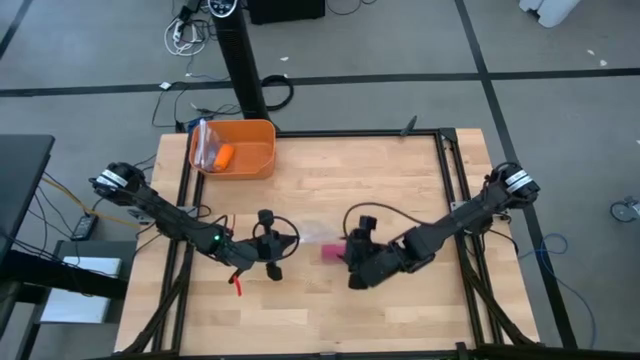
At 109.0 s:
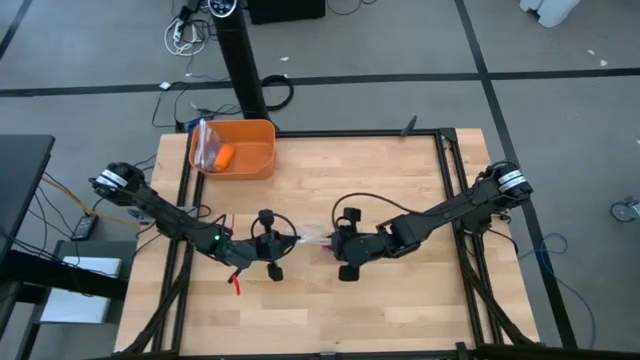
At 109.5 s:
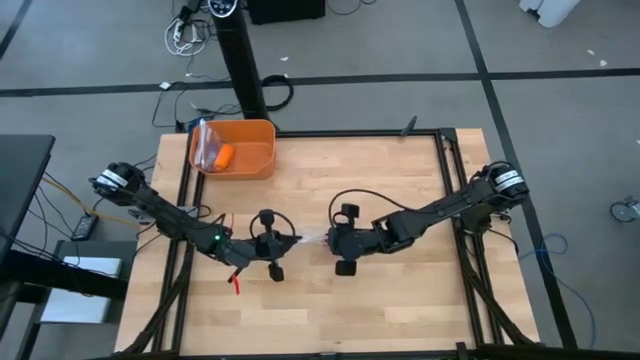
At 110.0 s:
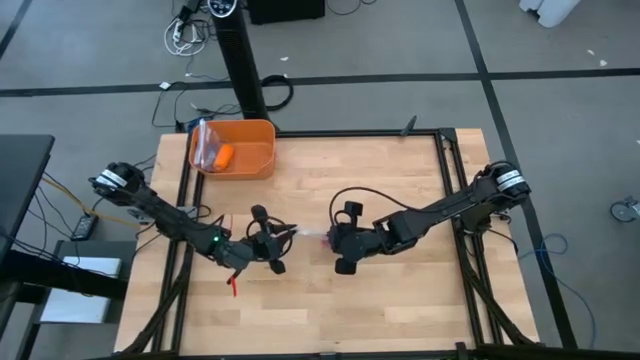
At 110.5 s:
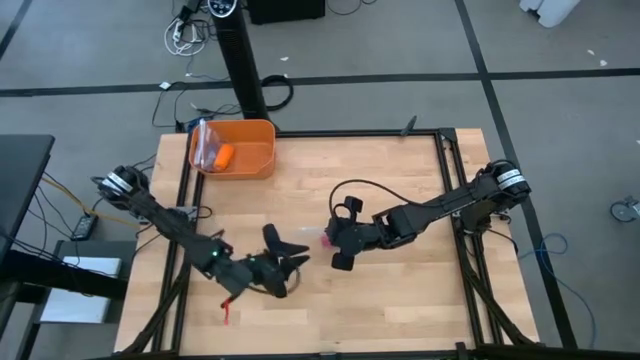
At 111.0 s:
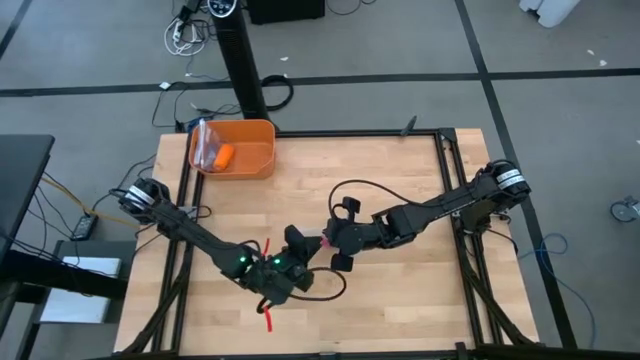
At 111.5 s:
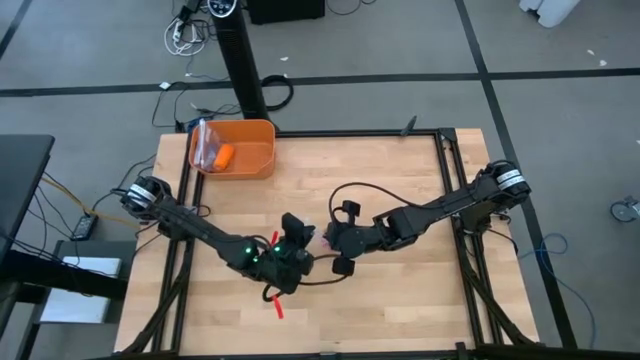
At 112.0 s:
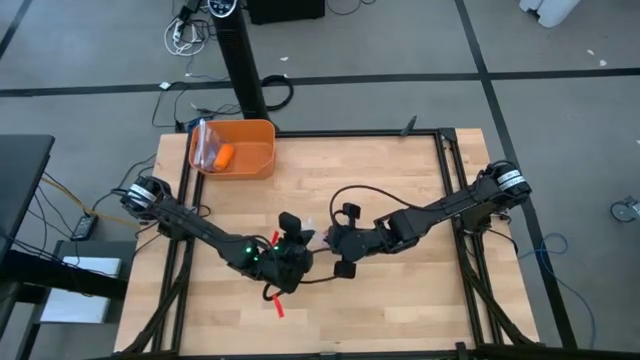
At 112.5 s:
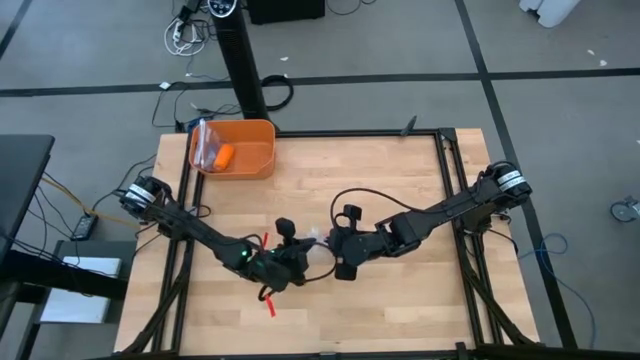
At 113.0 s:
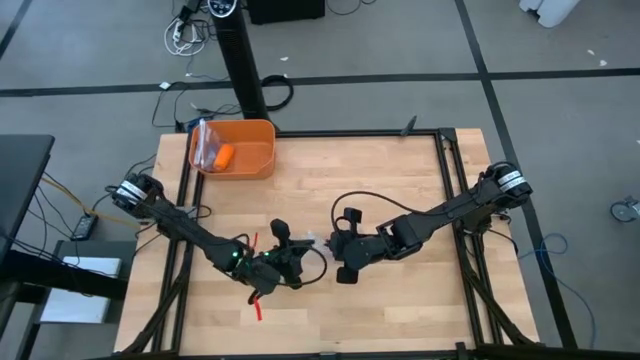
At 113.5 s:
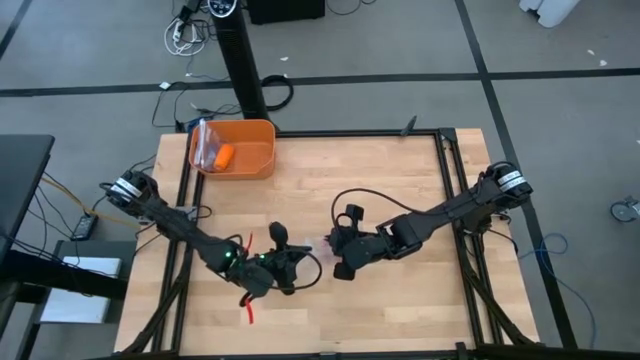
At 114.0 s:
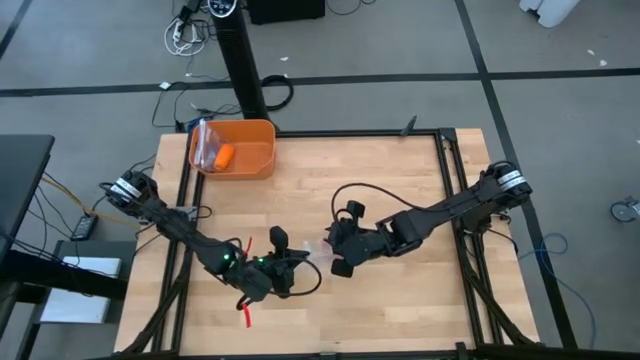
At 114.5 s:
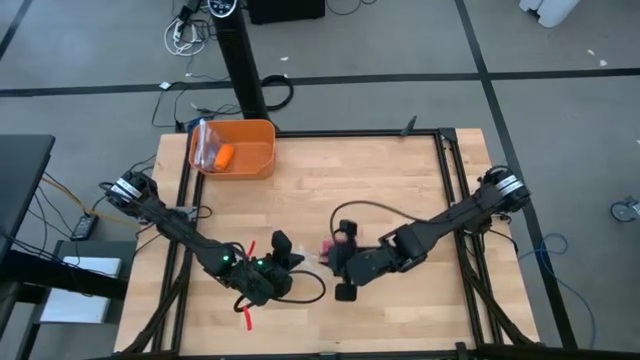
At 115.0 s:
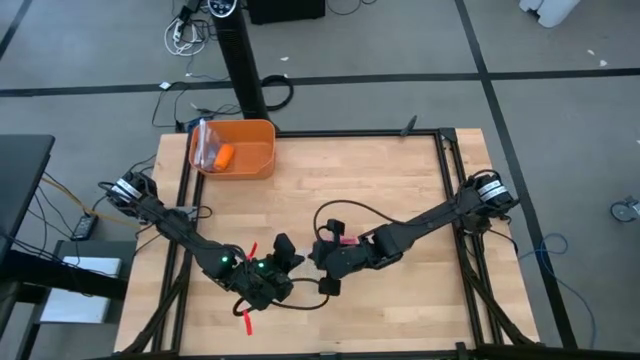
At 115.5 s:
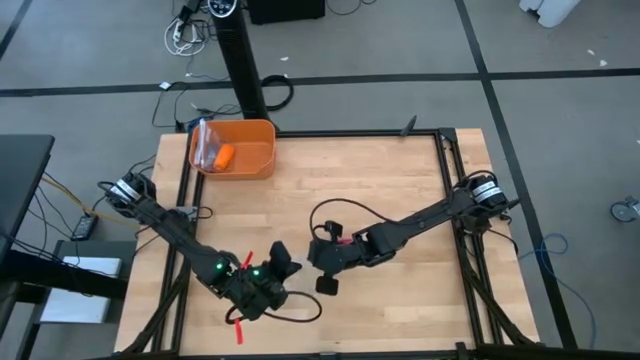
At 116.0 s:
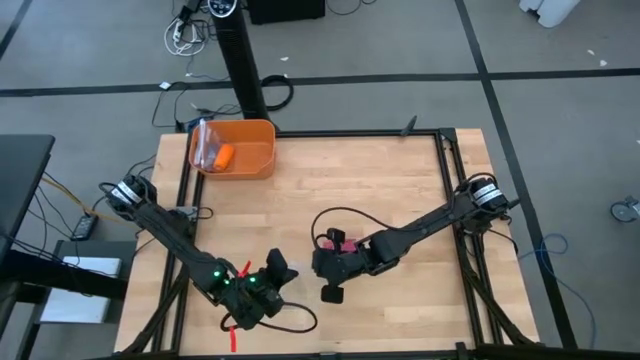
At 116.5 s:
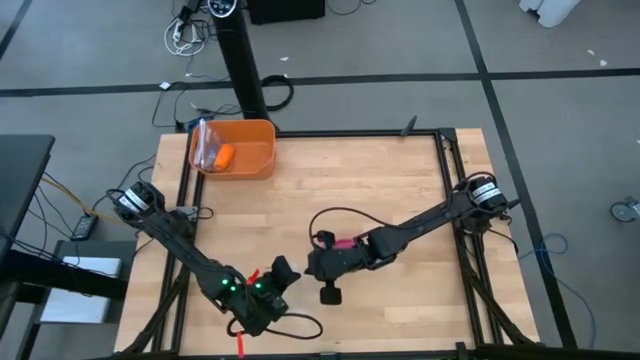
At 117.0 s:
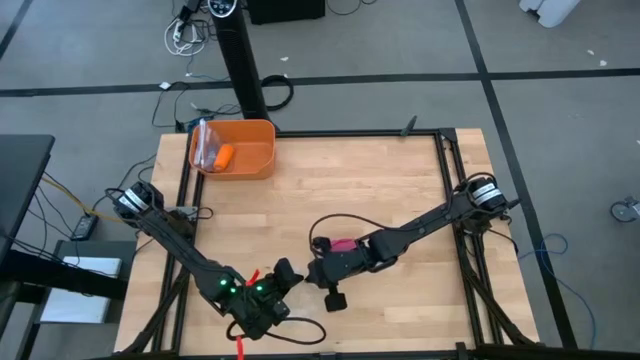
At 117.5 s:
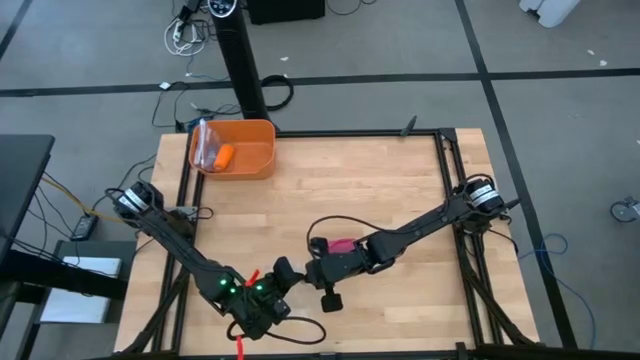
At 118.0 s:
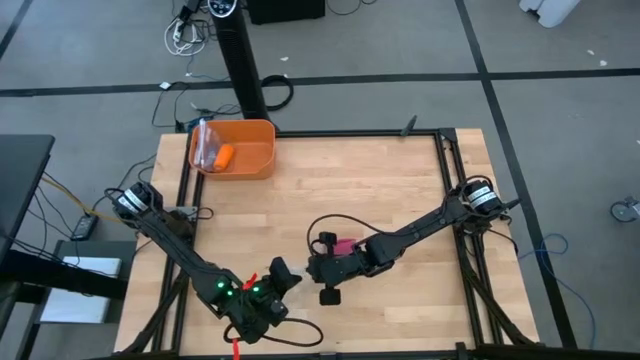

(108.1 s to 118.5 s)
Task: Roll bandage
Open the transparent zip bag
